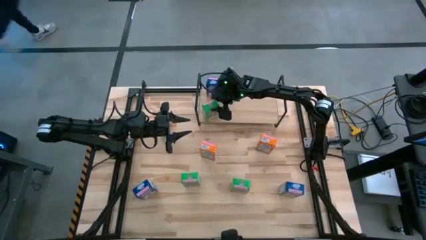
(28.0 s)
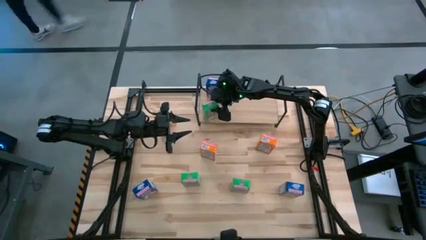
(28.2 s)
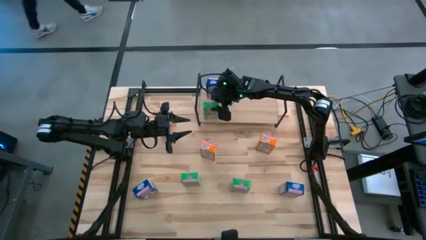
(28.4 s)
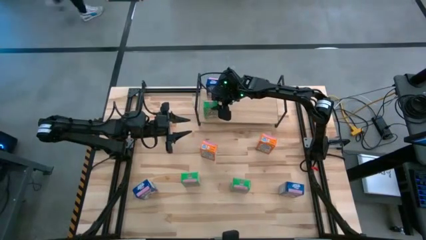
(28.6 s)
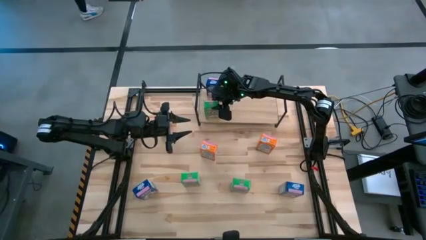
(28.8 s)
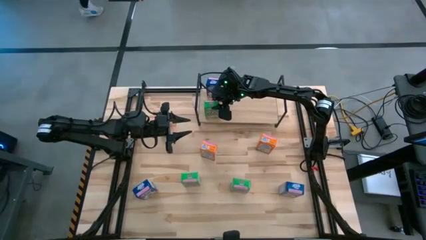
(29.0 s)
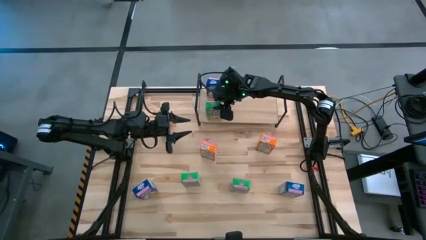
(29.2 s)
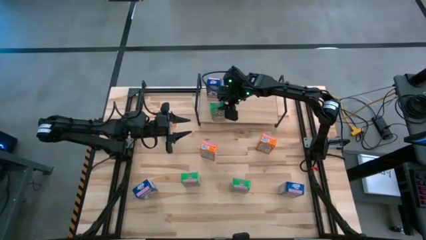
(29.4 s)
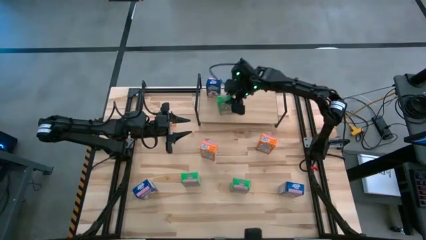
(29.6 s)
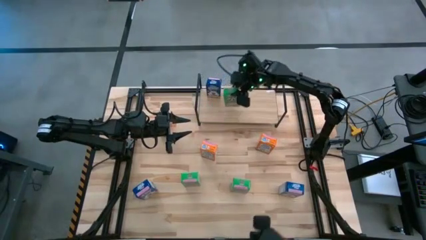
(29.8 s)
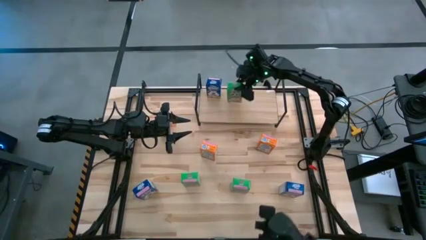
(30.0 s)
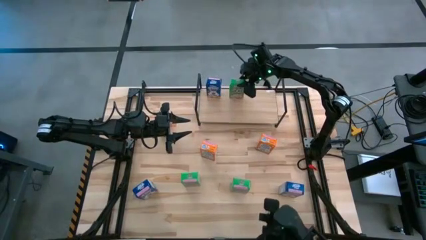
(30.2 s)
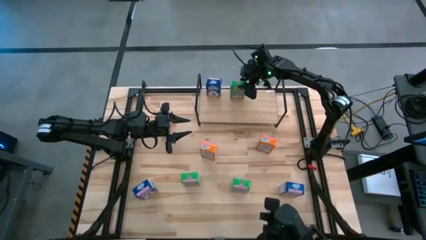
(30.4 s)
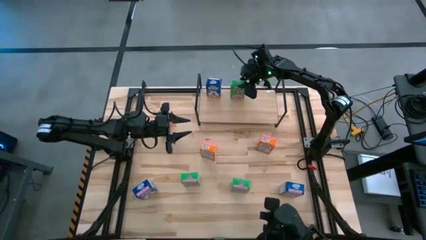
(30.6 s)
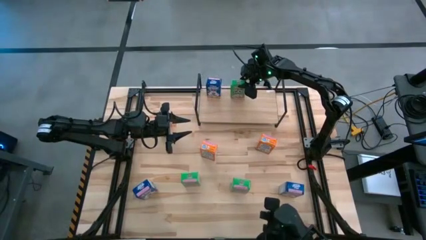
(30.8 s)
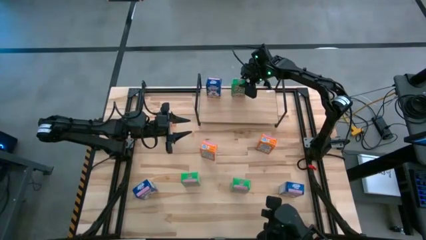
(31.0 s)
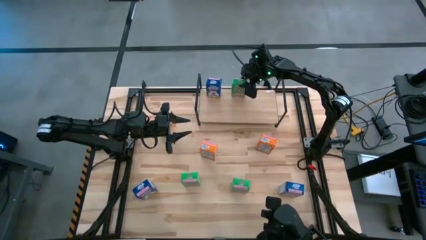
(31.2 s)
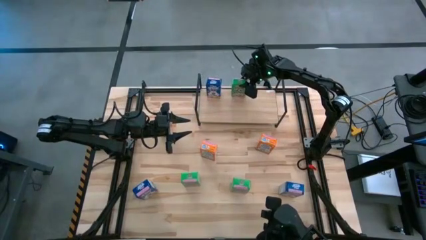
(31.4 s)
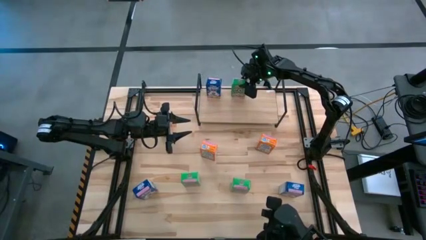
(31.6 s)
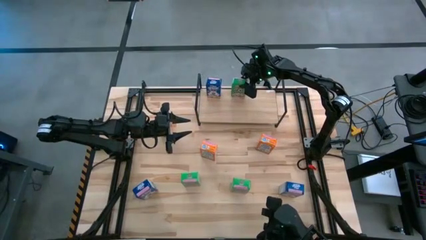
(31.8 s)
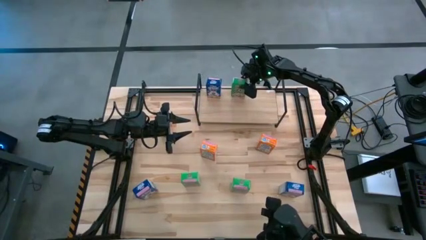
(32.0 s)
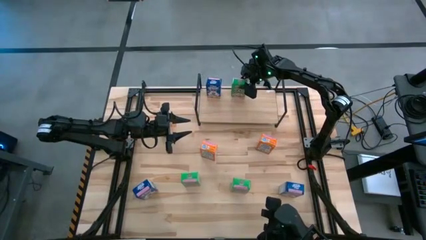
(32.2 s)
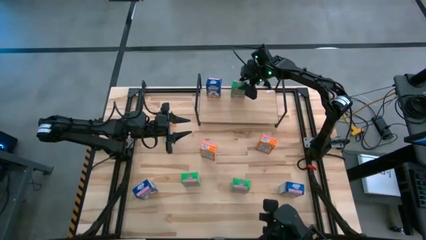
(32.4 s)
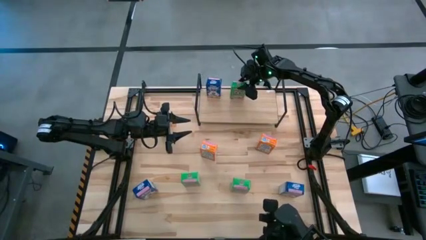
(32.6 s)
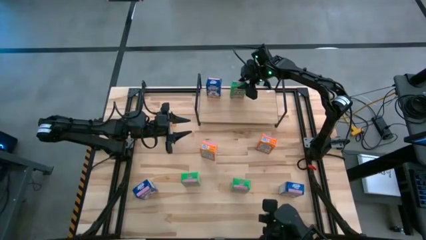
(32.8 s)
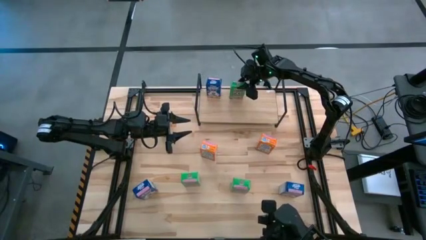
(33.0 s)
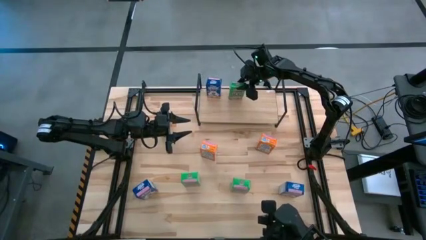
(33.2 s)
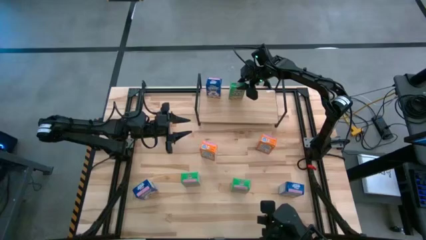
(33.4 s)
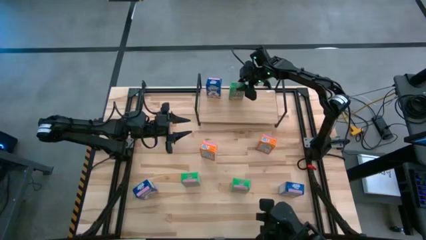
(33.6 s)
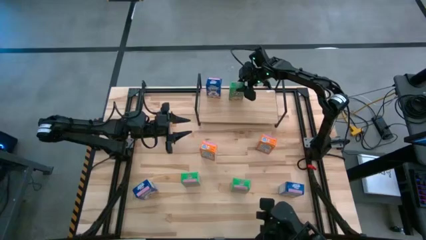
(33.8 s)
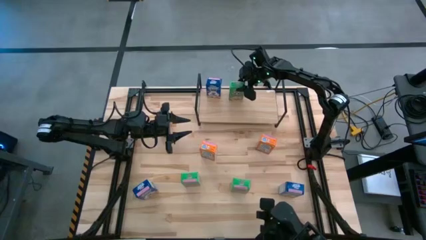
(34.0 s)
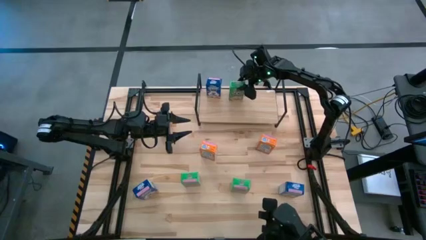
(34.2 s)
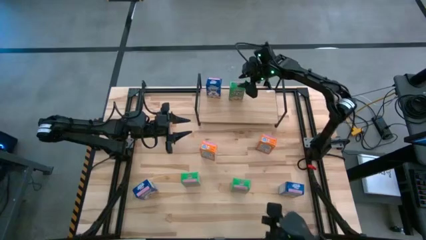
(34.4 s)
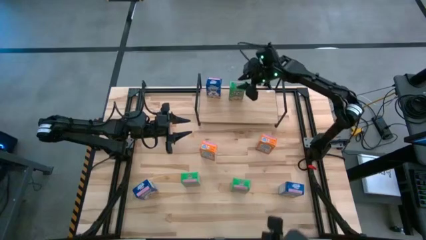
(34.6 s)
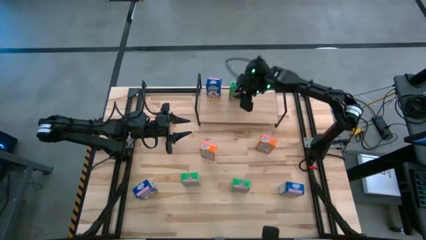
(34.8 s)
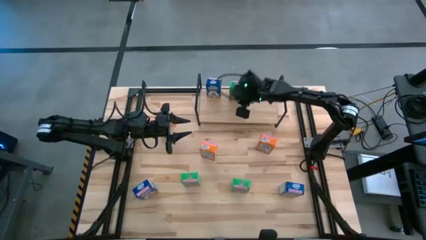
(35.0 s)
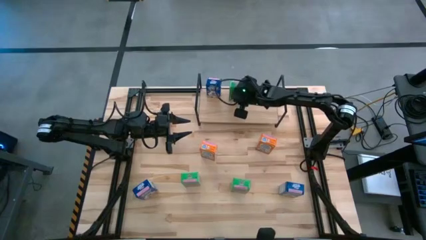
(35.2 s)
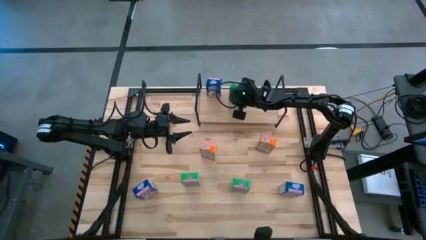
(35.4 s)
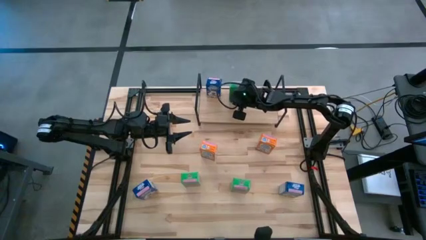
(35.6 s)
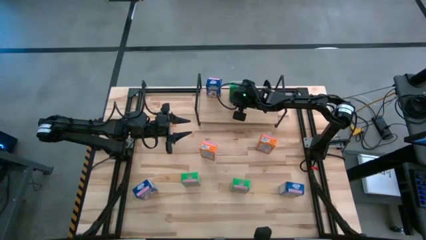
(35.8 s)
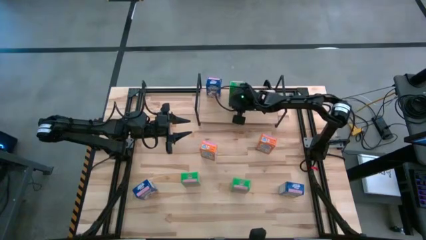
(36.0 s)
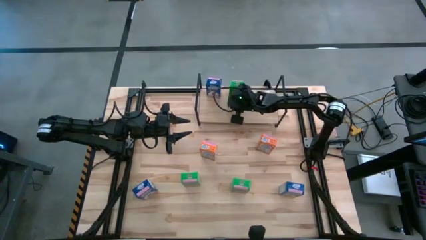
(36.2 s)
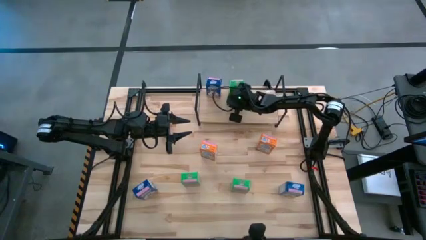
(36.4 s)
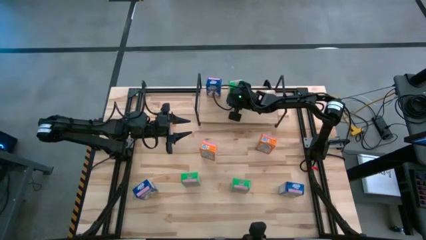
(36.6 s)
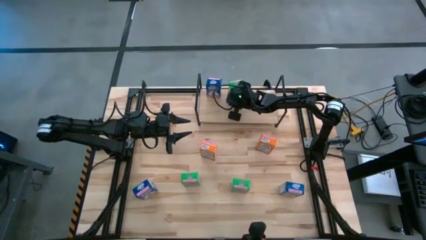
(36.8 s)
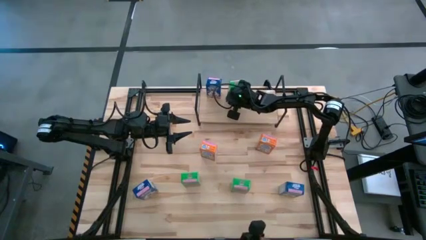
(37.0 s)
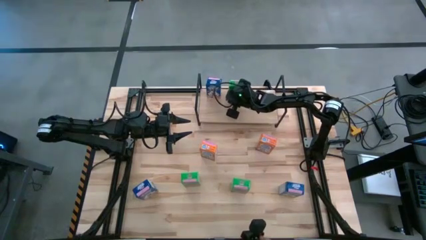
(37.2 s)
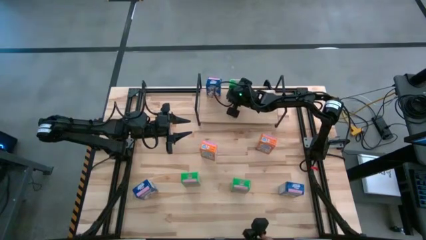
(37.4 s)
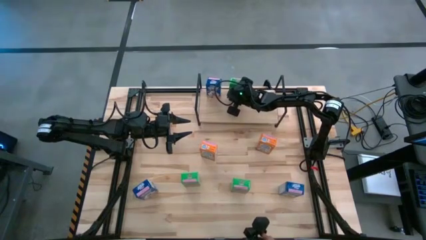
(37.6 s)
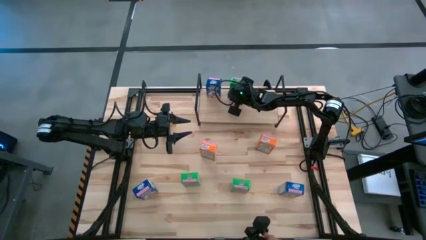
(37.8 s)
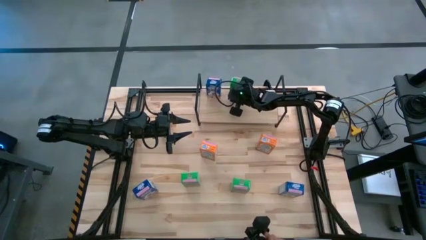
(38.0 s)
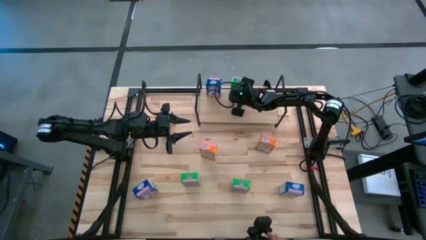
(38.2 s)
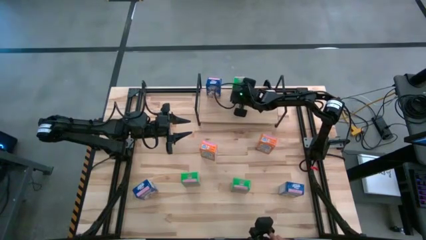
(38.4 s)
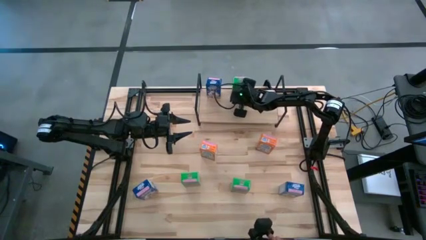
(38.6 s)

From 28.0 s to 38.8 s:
Task: Stack cereal on shelf
Put the top green cereal box on the shelf

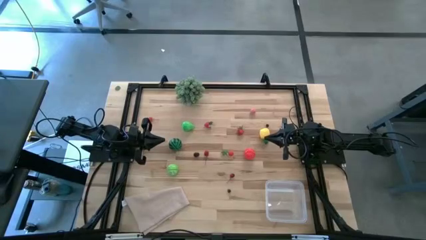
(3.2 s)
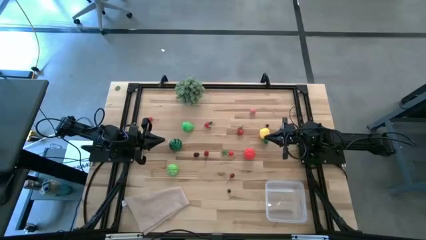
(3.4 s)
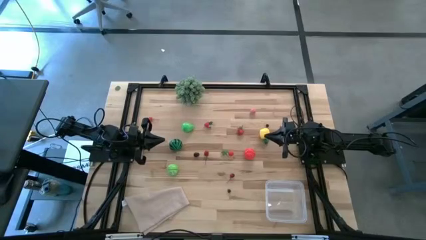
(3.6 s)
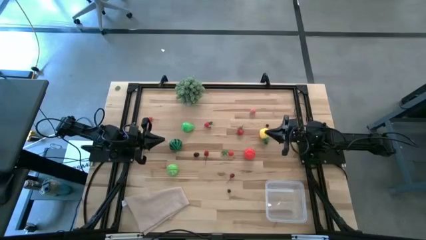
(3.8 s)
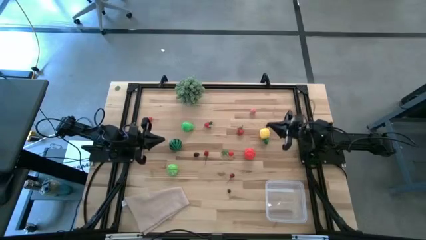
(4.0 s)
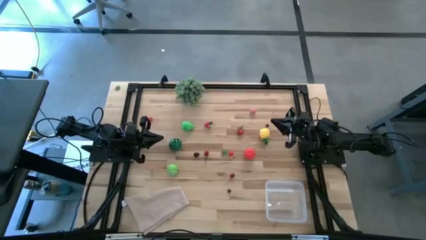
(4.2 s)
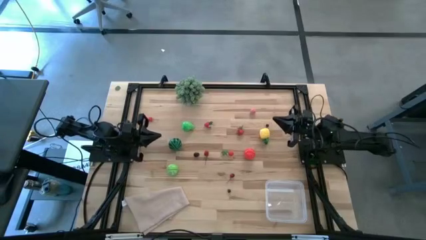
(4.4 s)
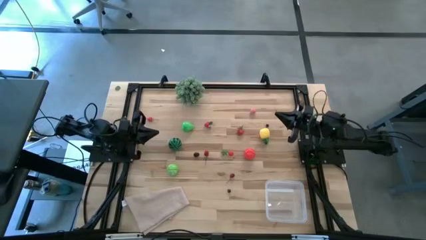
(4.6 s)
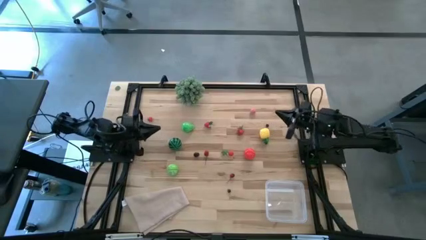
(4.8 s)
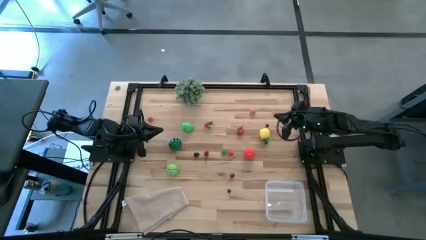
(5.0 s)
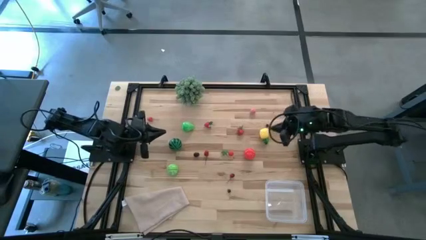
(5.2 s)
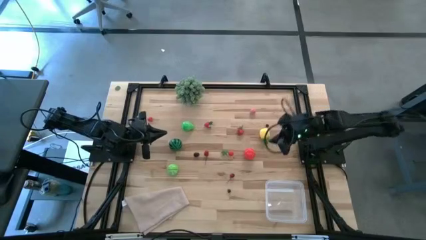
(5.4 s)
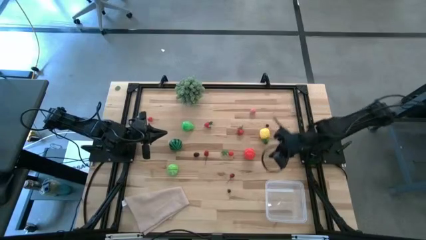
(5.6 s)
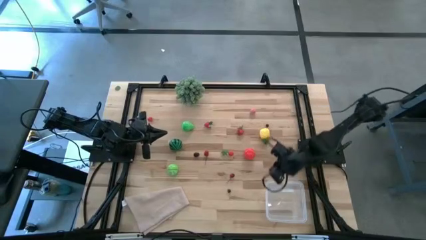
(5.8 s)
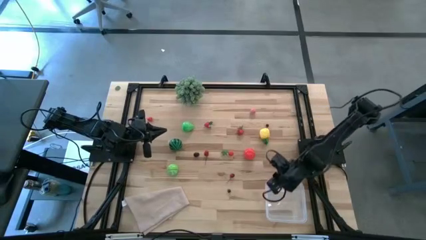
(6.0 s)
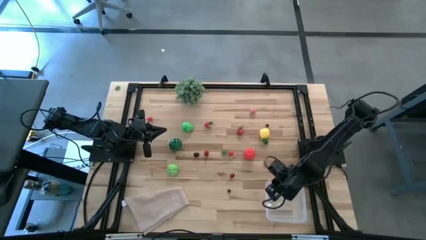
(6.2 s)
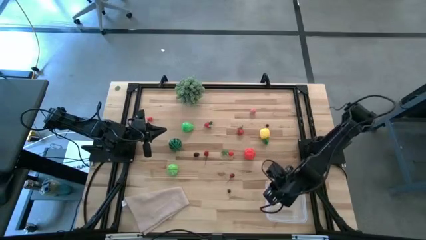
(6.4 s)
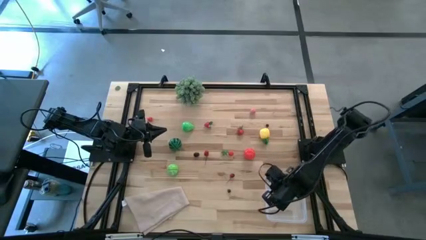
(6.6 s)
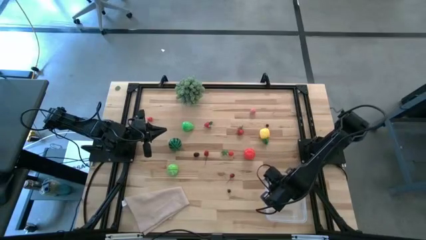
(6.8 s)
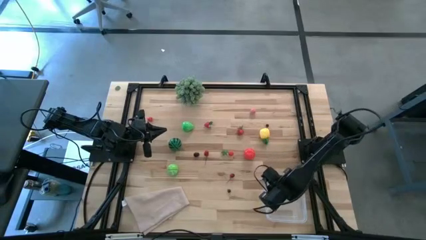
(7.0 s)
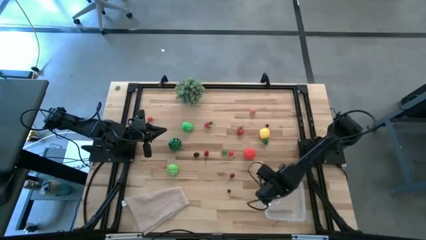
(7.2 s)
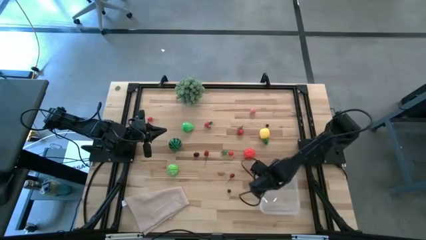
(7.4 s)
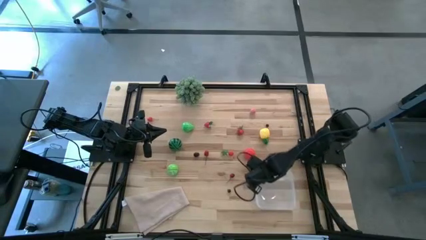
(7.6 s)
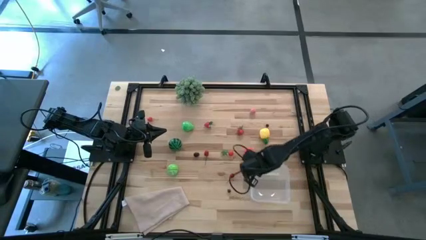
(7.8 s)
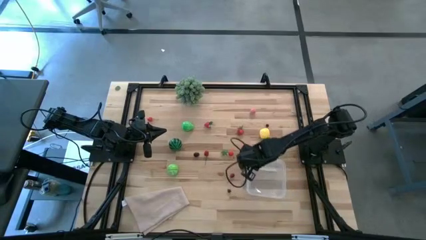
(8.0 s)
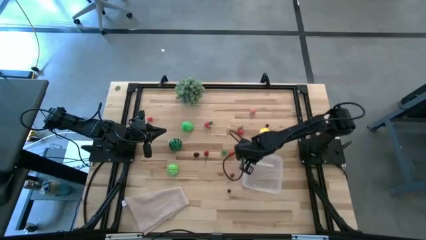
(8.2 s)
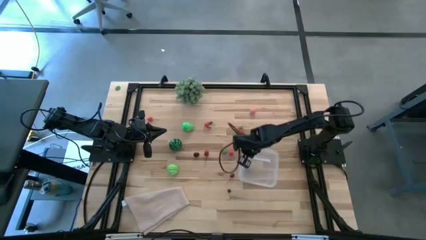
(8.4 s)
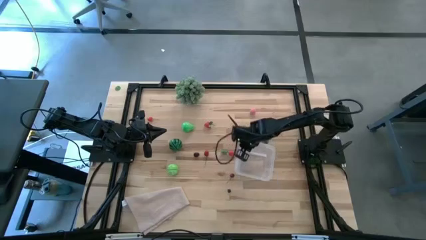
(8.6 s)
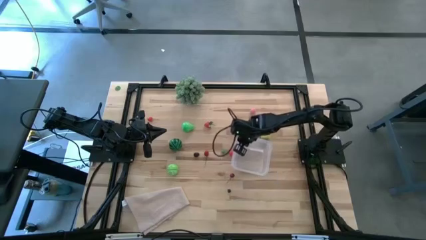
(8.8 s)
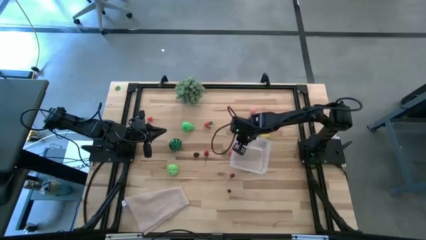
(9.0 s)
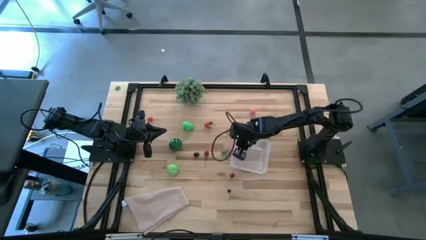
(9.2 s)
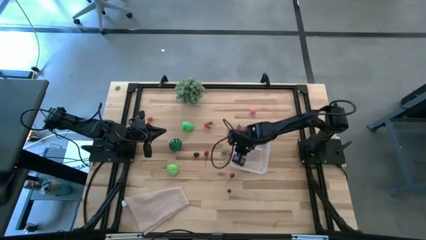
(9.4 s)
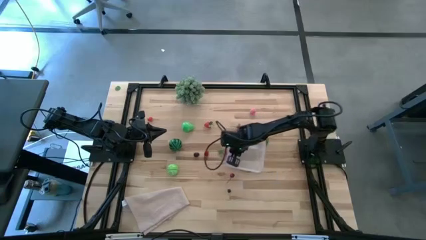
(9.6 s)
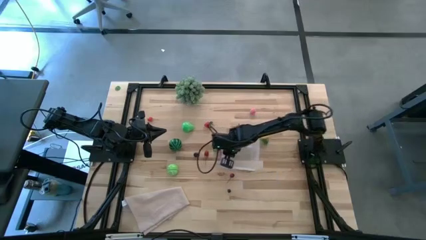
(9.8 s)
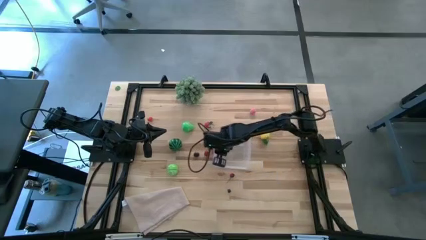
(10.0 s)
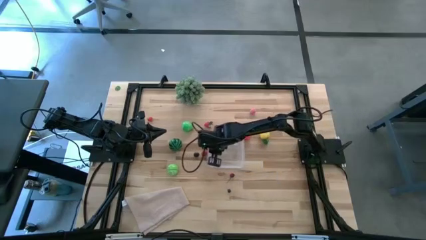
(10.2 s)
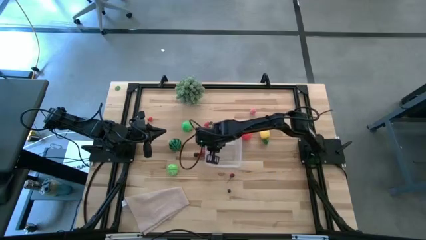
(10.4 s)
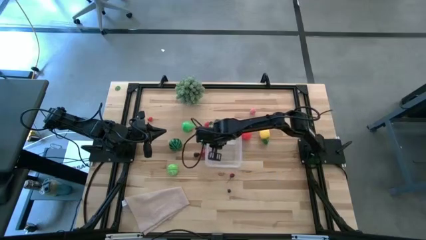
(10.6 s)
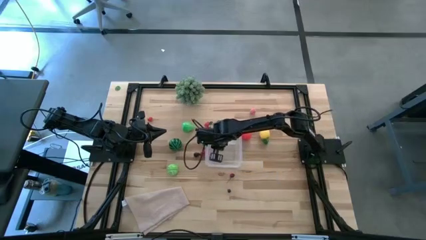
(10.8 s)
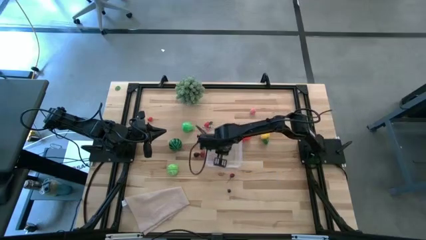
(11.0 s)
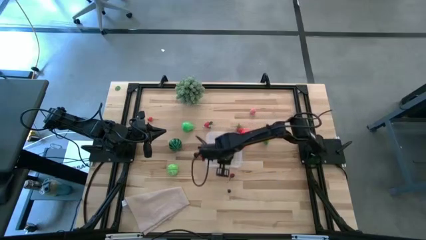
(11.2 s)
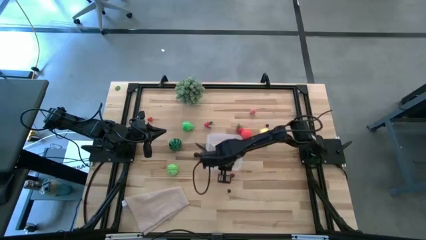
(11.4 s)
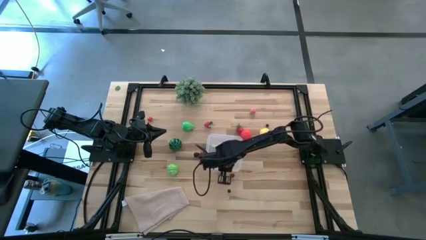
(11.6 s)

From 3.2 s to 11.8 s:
Task: Pick and placing Produce into tupperware
Move the transparent bin to the center of the table
